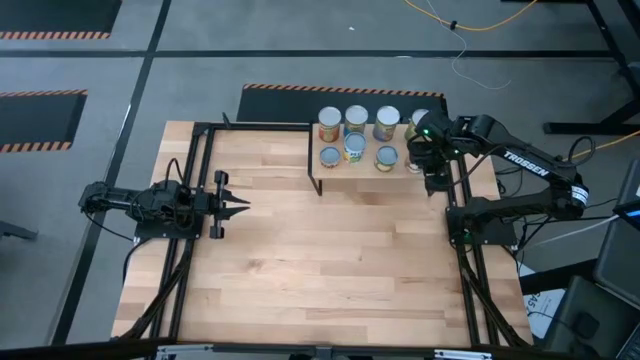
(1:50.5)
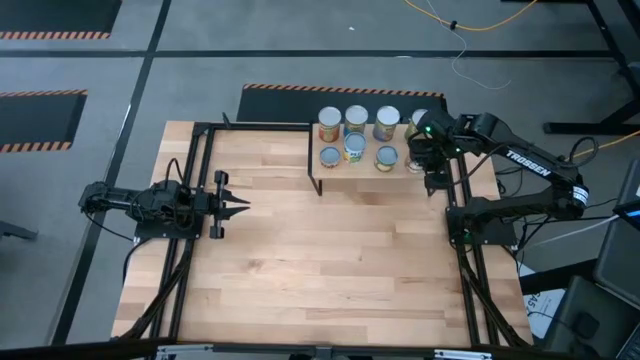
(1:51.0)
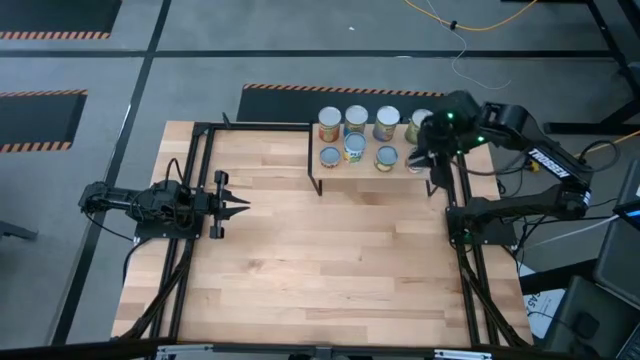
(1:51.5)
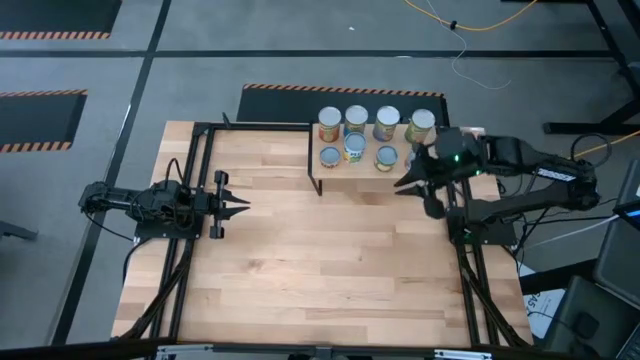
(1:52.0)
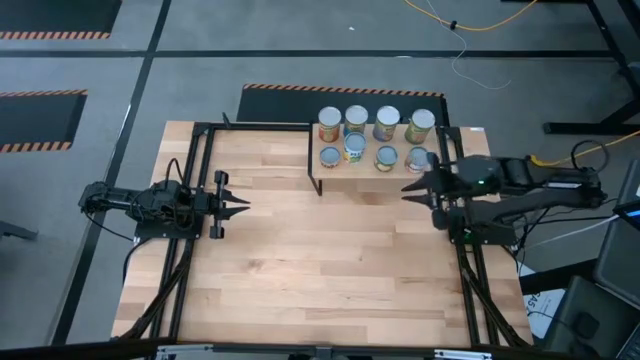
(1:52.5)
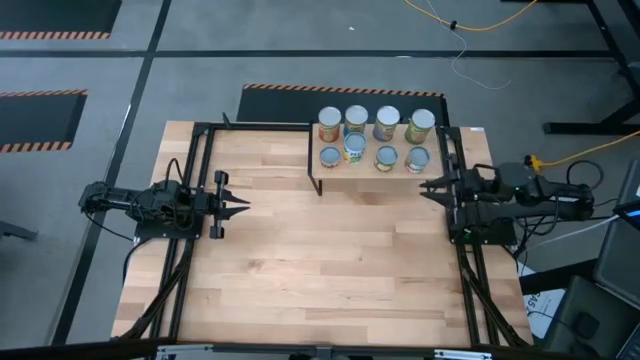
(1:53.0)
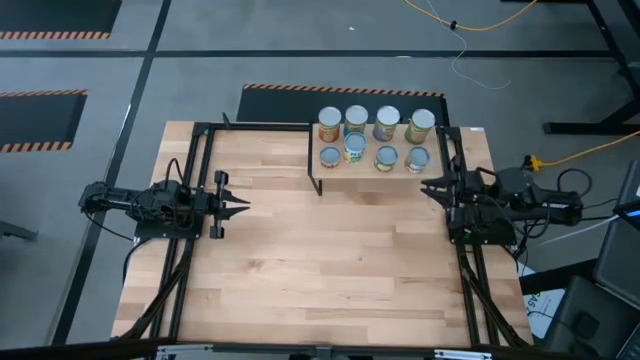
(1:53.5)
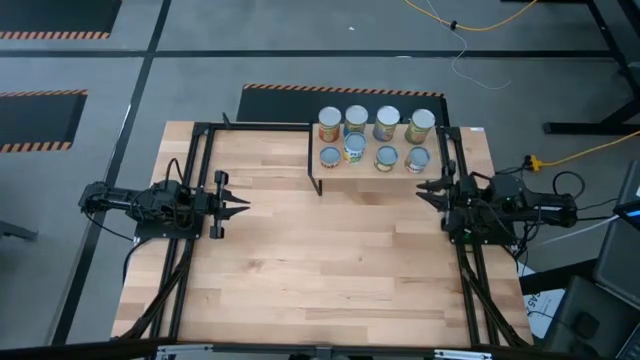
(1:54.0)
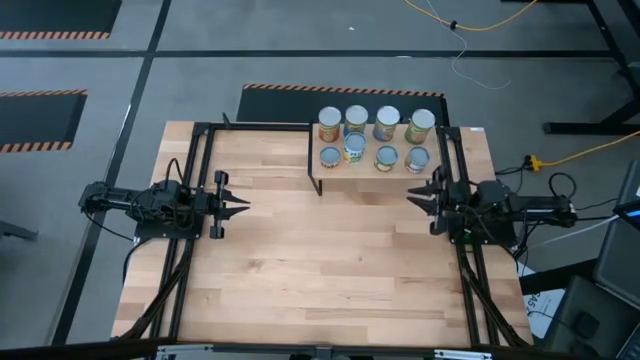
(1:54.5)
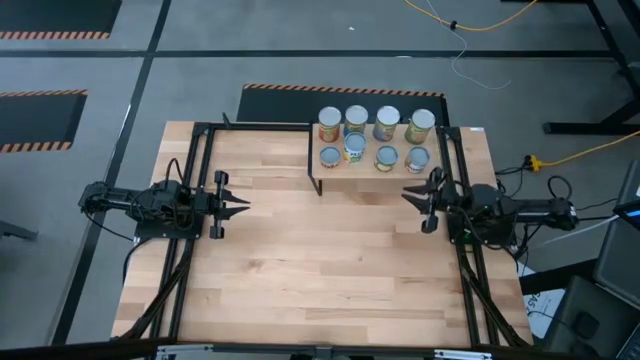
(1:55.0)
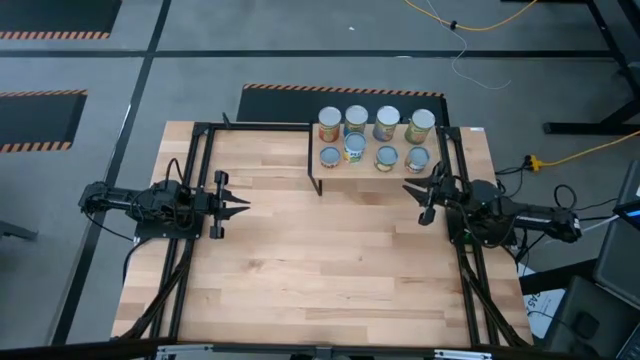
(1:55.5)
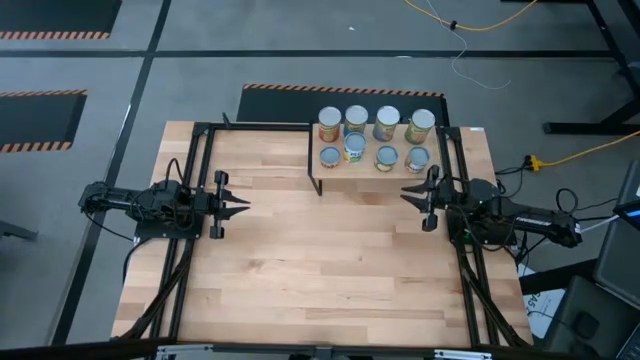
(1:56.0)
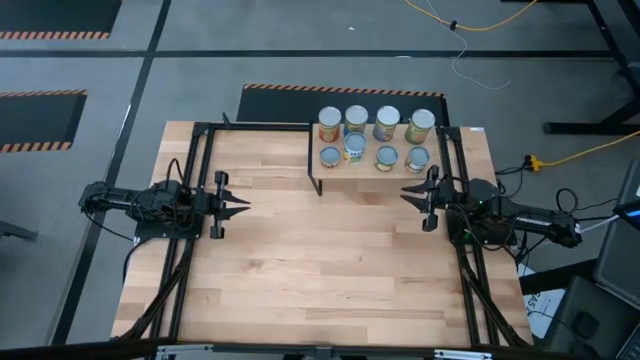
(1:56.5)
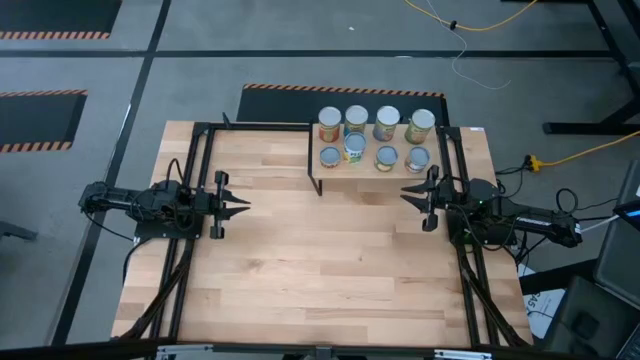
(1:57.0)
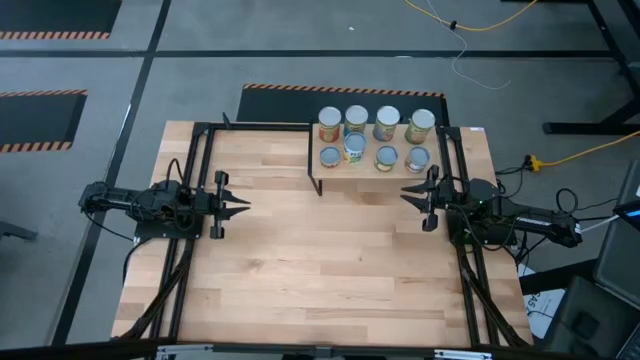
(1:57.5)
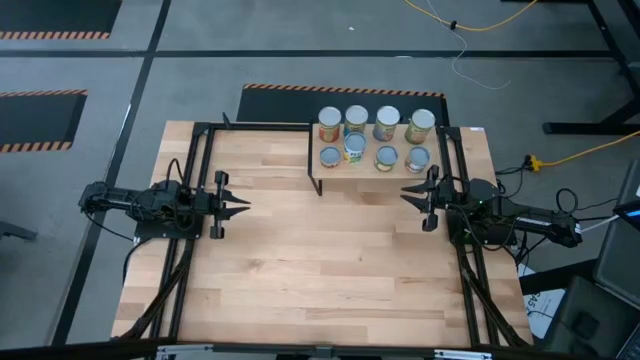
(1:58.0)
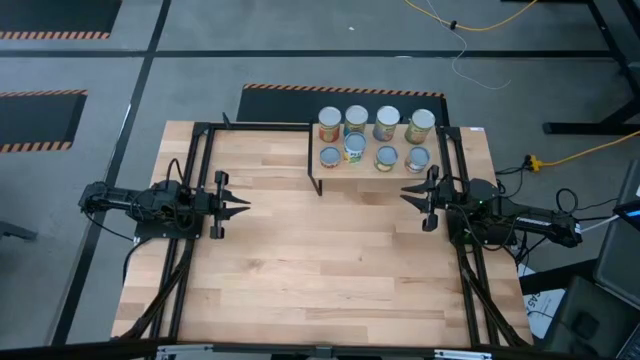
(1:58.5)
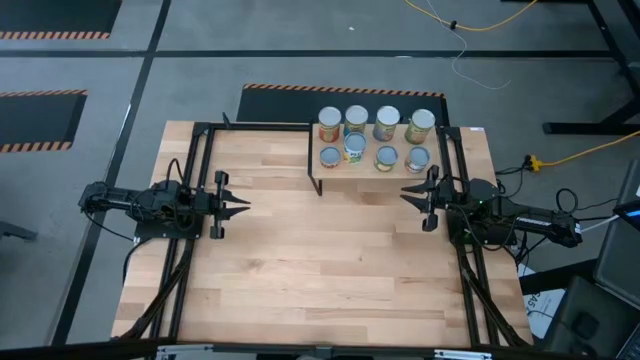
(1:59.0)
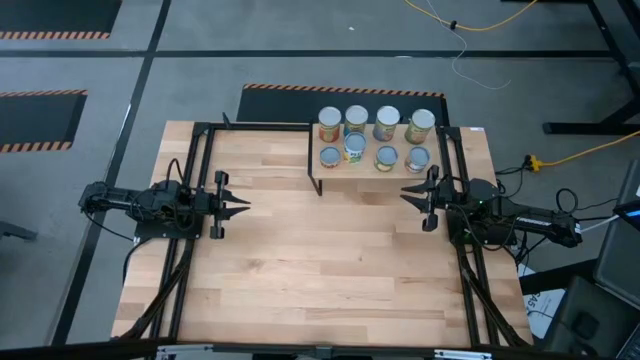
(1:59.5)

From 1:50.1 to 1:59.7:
Task: Pick and place cans onto a shelf
Return to Home Position

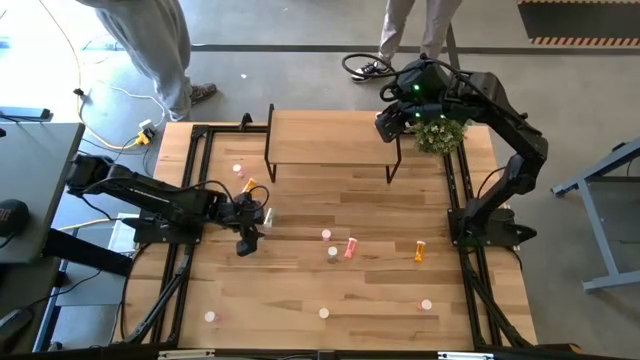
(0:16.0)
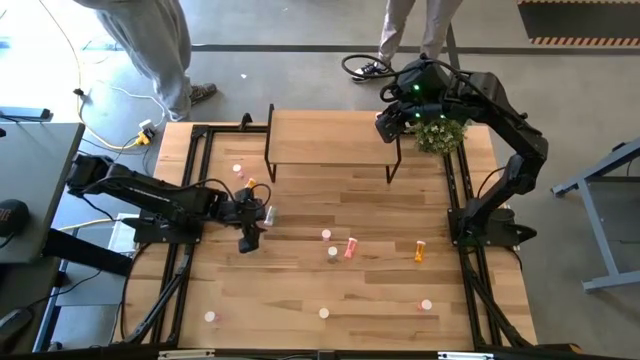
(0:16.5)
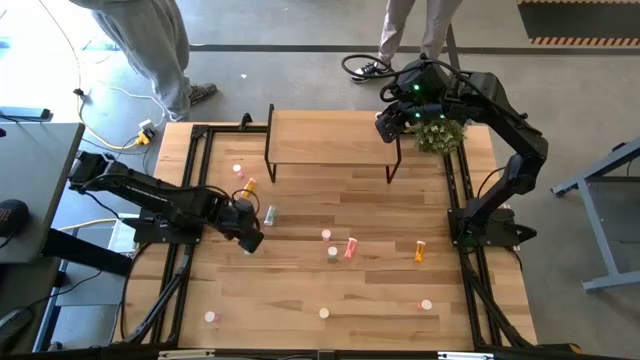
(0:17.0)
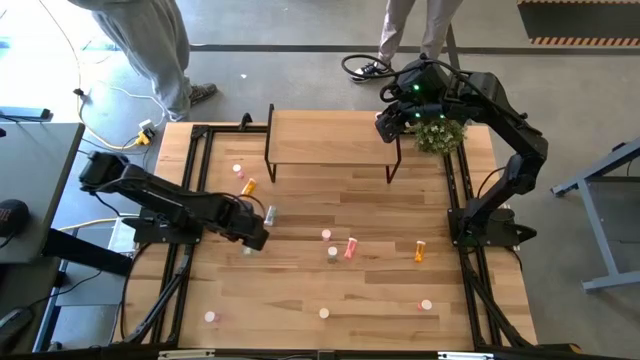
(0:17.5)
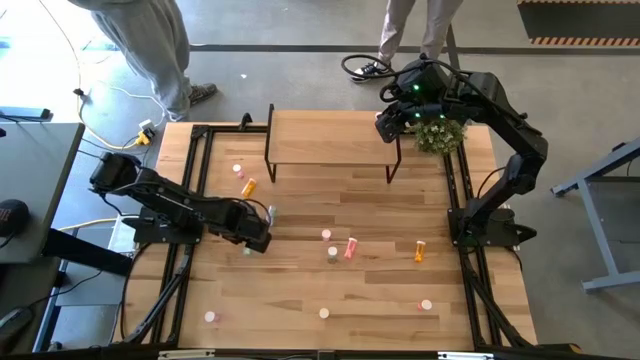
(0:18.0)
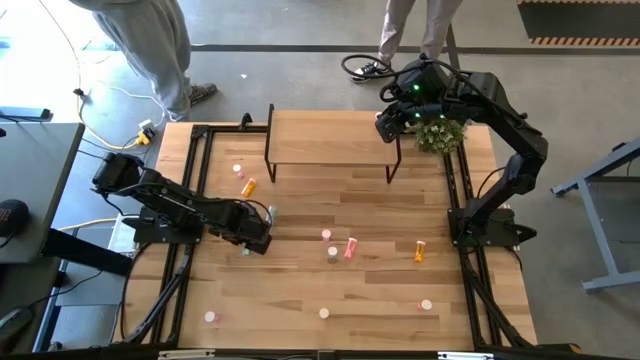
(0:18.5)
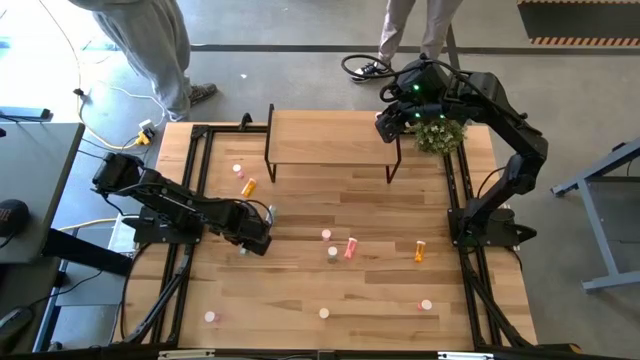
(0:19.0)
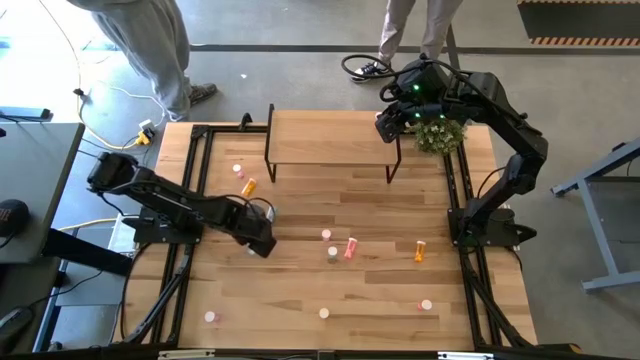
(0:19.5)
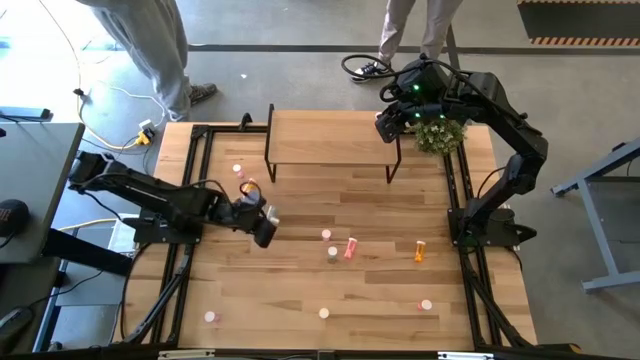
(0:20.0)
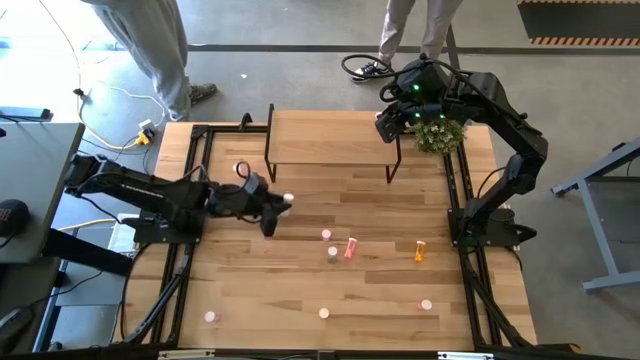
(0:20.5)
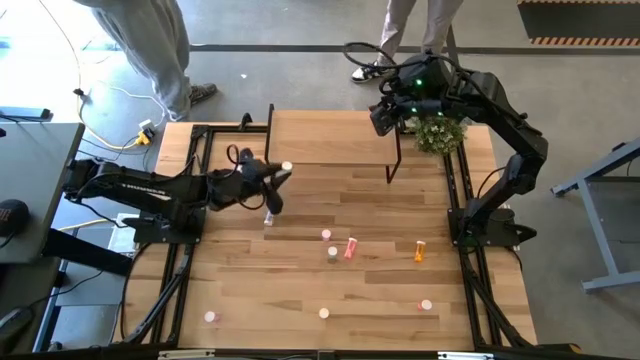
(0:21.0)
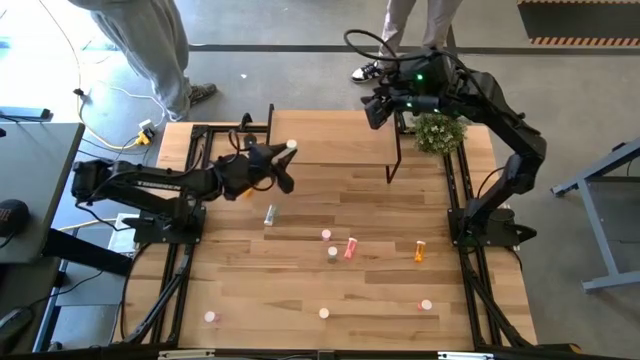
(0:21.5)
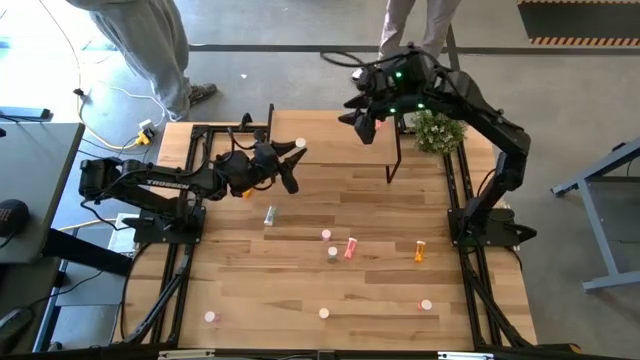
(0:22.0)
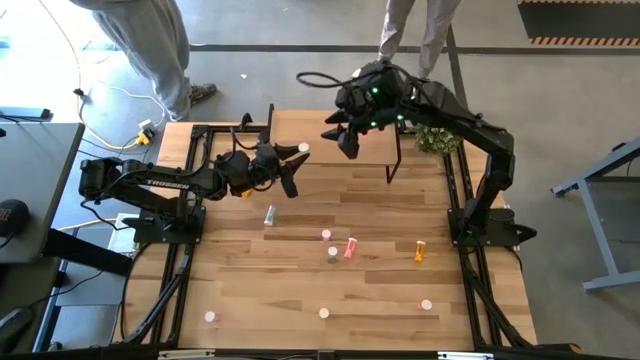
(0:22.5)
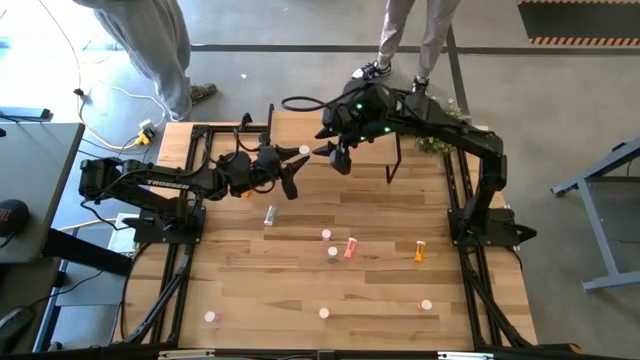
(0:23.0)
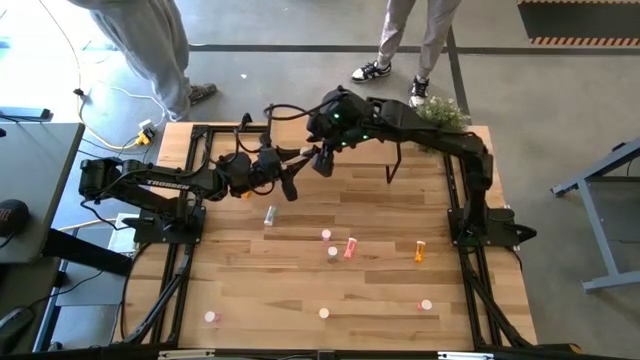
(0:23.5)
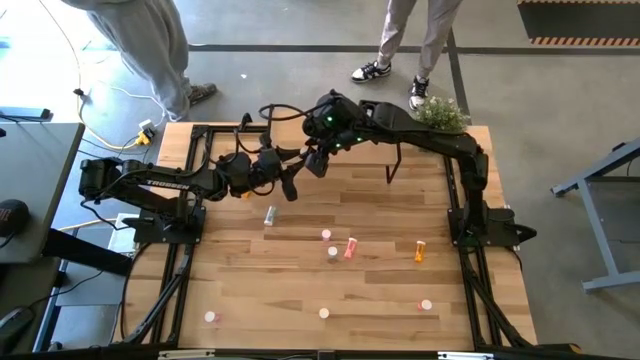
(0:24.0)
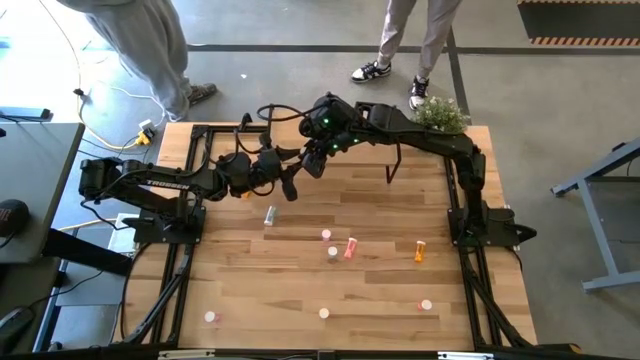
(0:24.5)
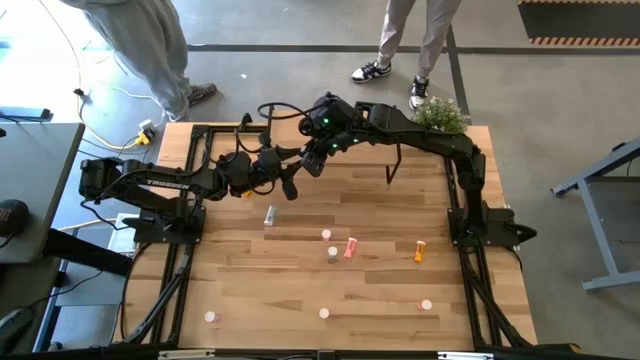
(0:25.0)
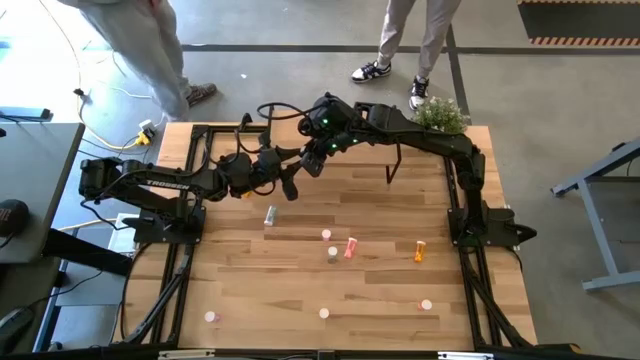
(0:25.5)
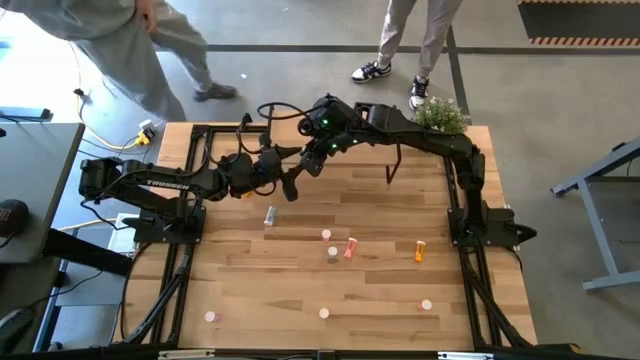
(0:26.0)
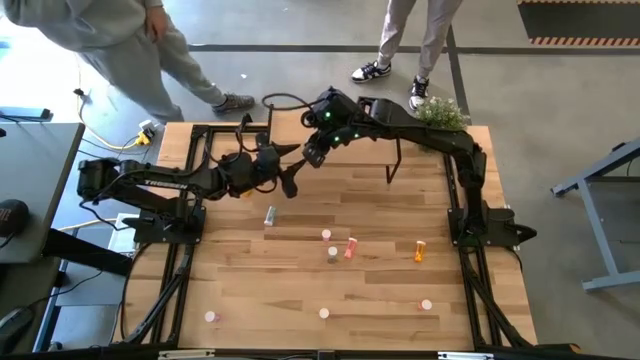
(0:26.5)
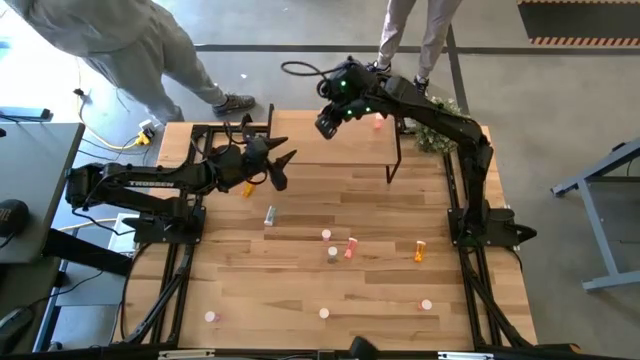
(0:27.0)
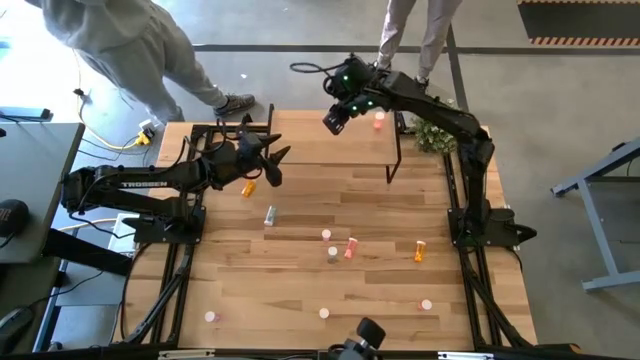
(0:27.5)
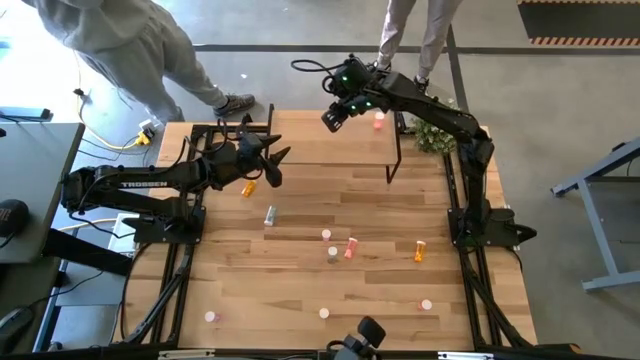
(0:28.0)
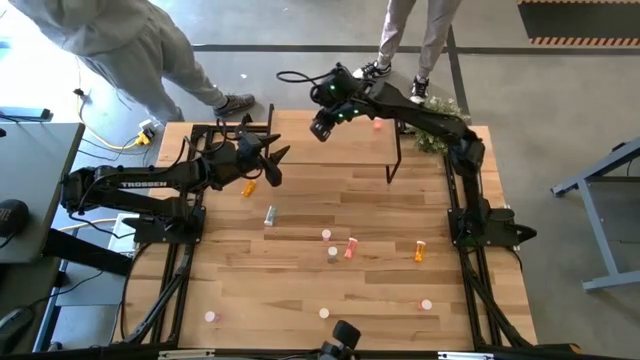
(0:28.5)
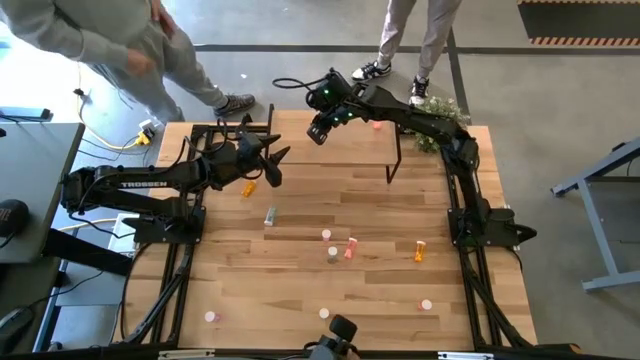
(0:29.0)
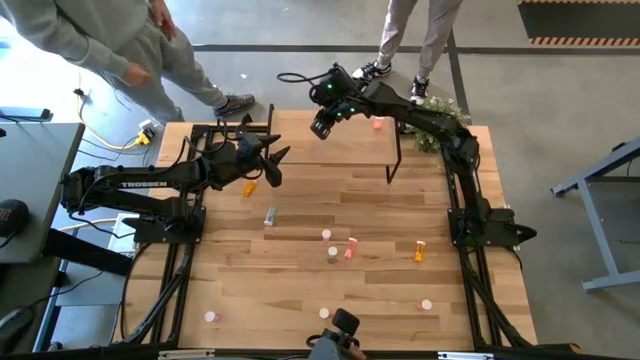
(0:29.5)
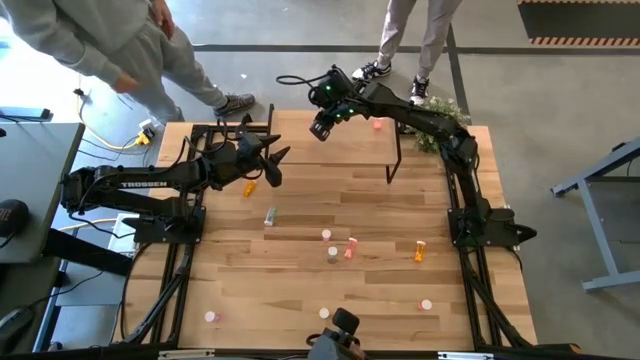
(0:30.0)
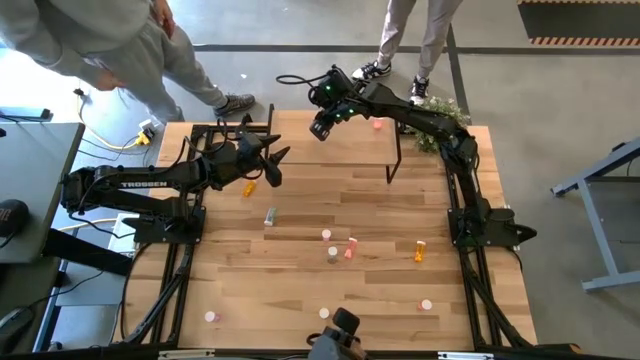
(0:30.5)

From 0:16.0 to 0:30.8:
Task: Pick and place medicine bottles onto shelf by color
Put the top left blue pill bottle on the shelf
